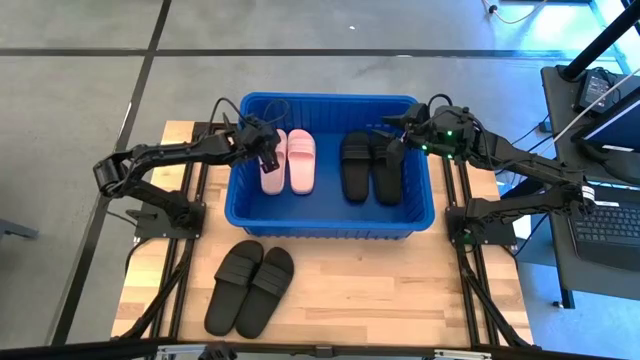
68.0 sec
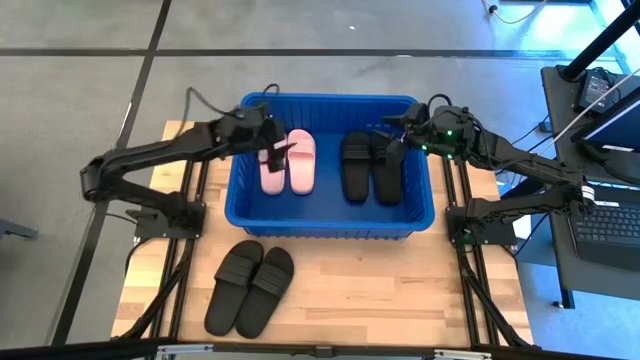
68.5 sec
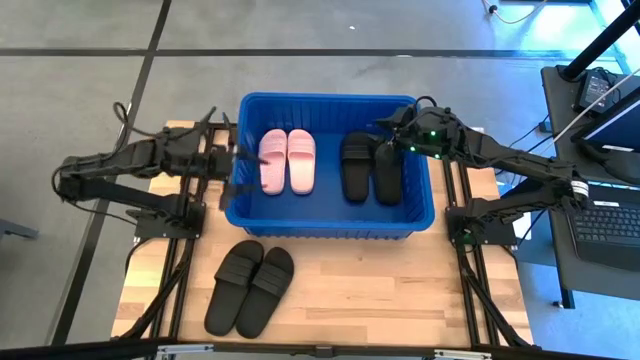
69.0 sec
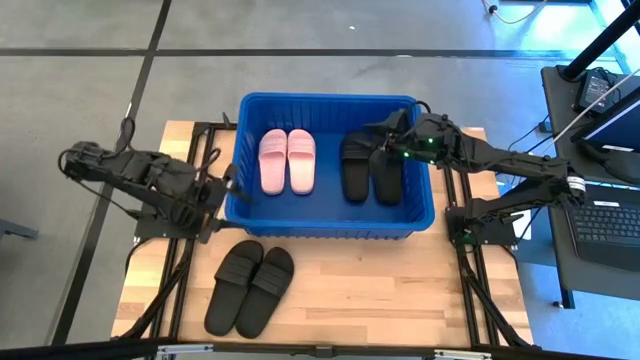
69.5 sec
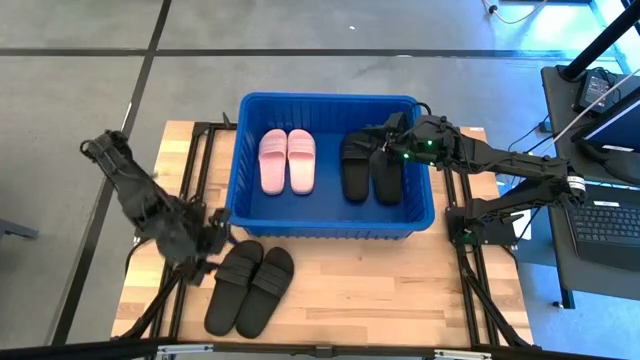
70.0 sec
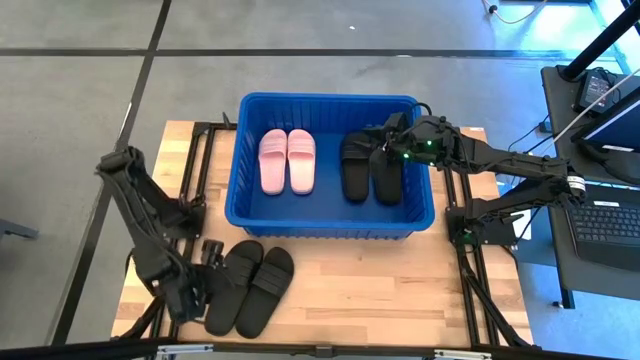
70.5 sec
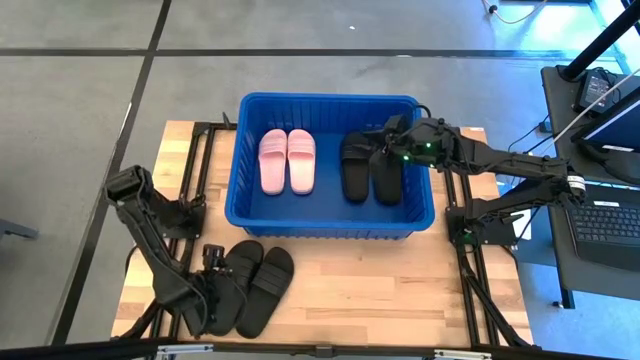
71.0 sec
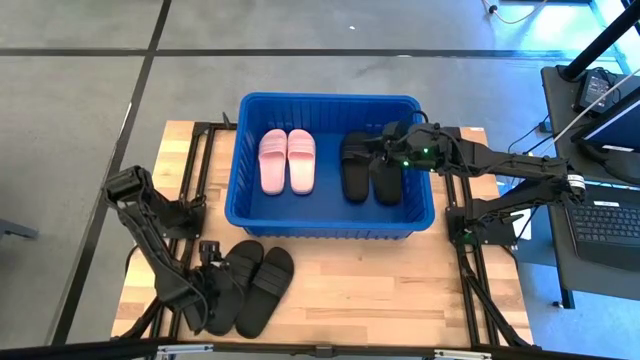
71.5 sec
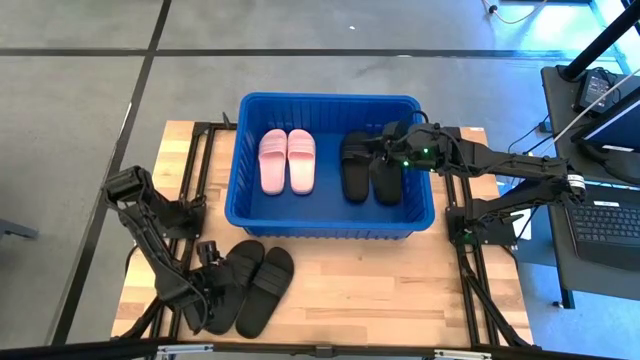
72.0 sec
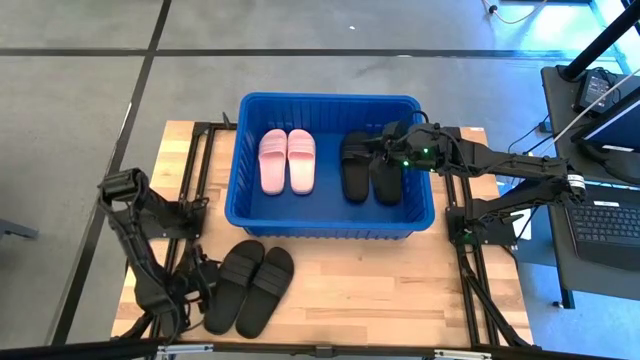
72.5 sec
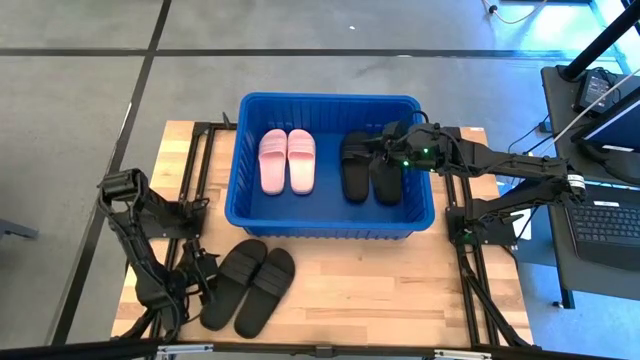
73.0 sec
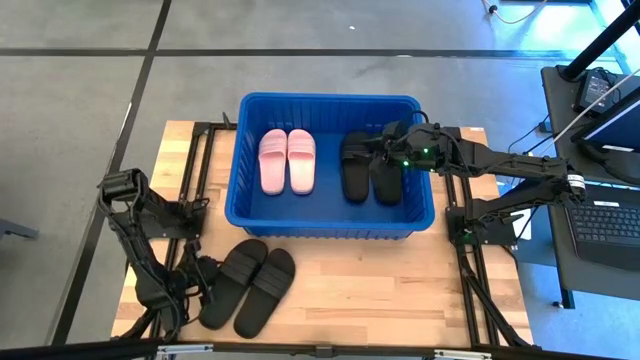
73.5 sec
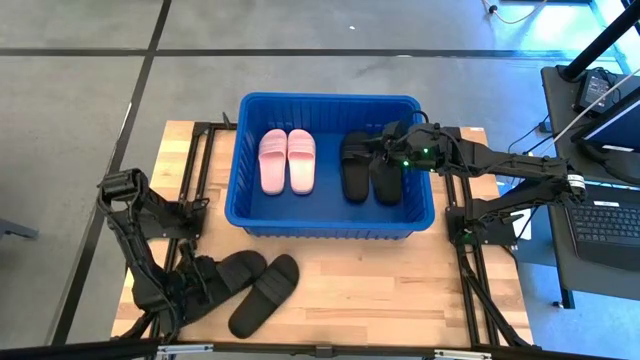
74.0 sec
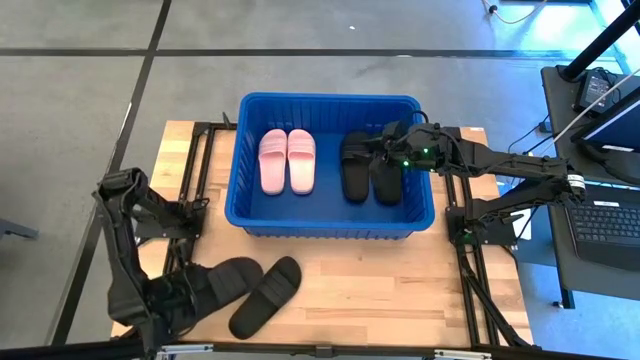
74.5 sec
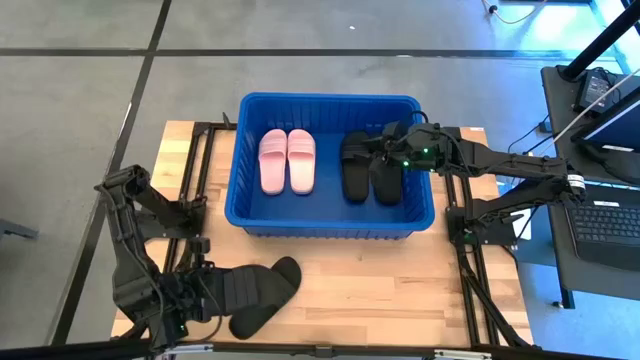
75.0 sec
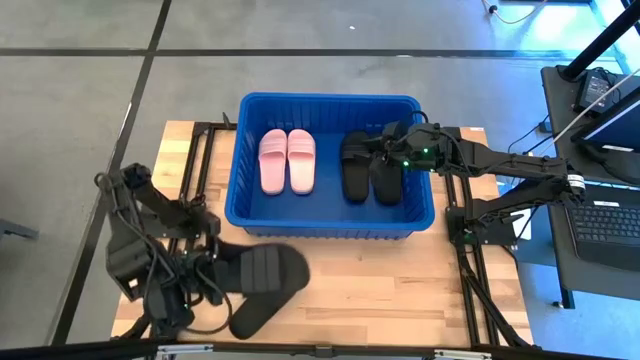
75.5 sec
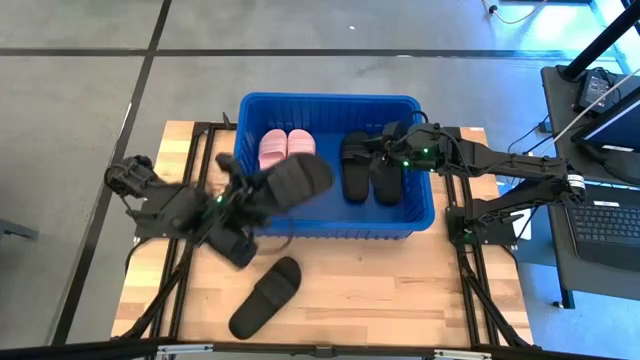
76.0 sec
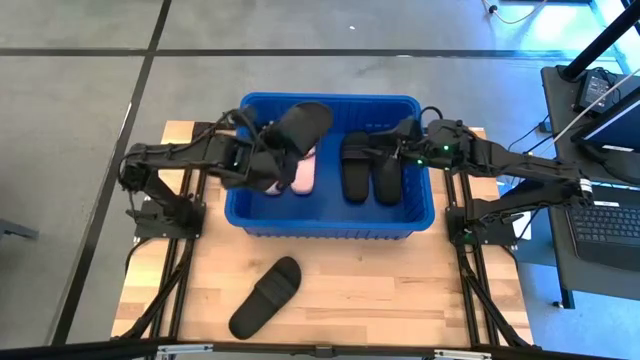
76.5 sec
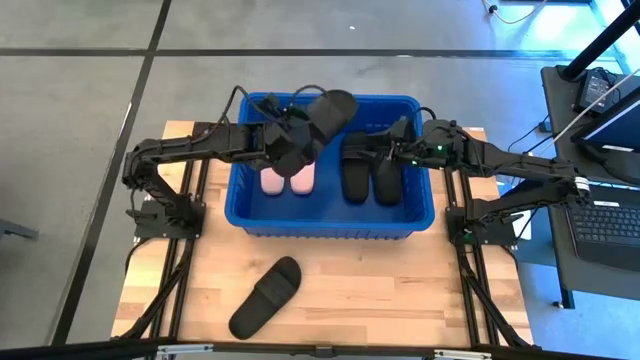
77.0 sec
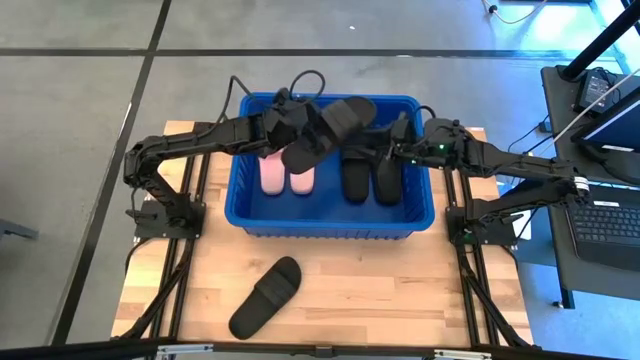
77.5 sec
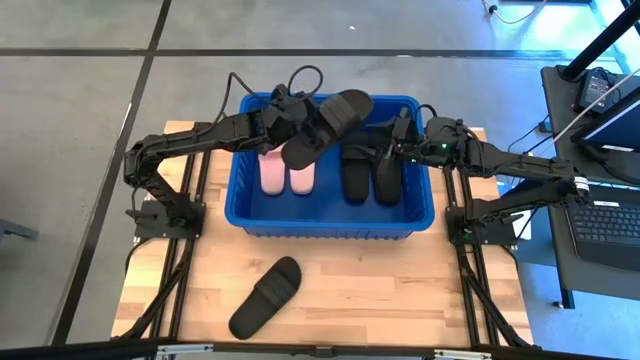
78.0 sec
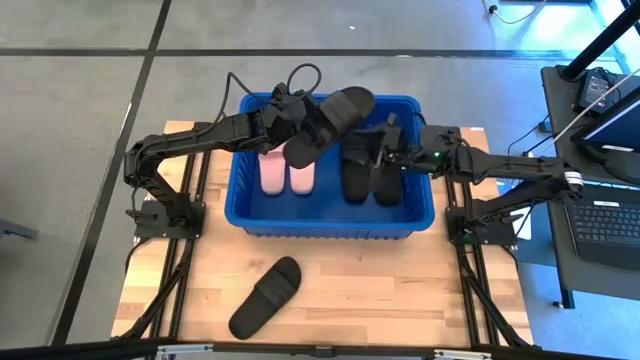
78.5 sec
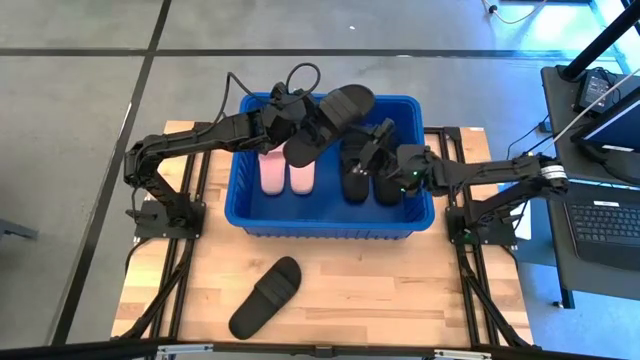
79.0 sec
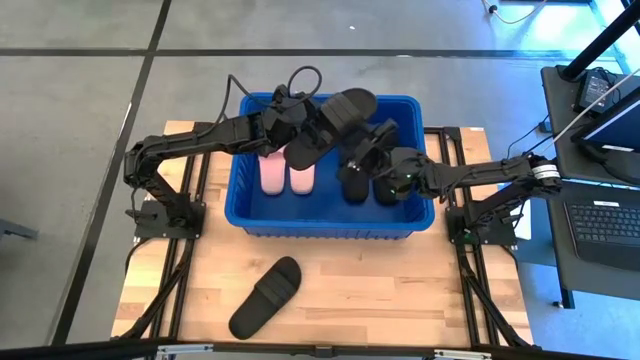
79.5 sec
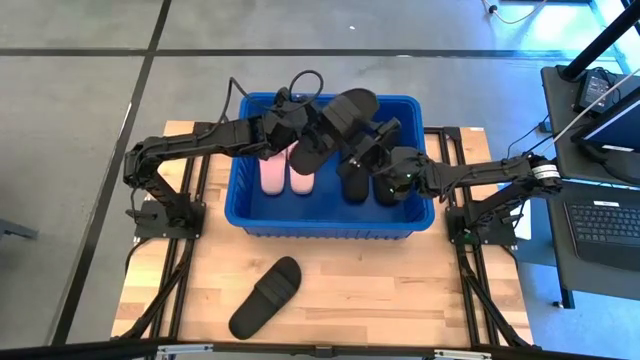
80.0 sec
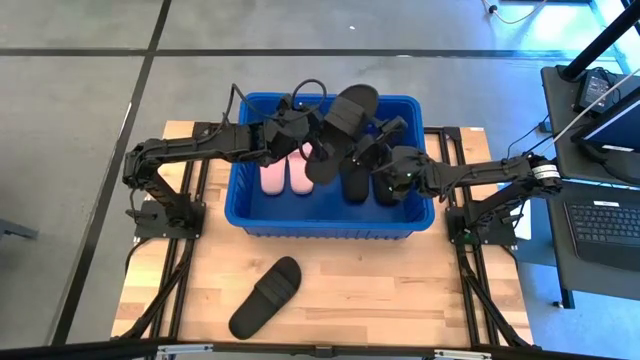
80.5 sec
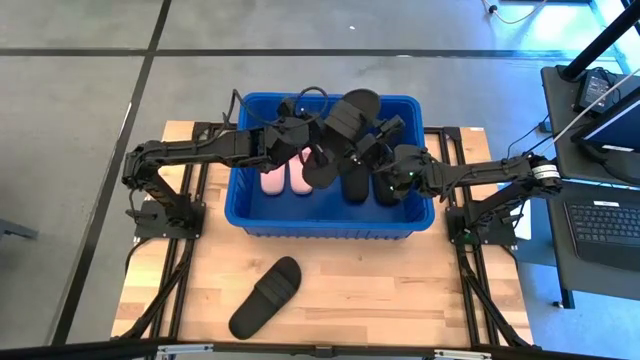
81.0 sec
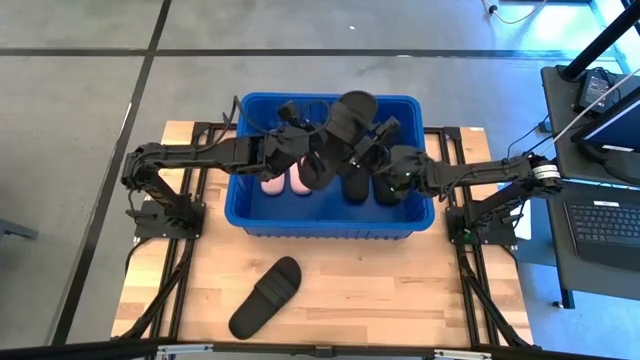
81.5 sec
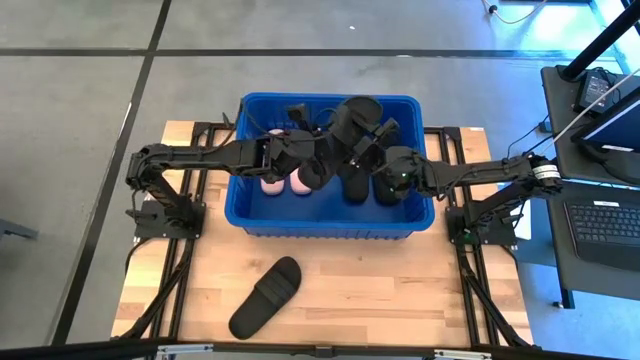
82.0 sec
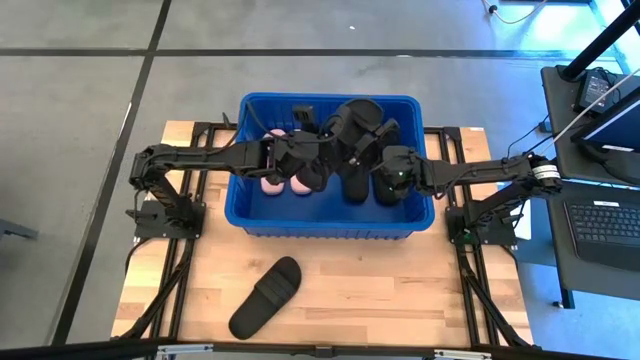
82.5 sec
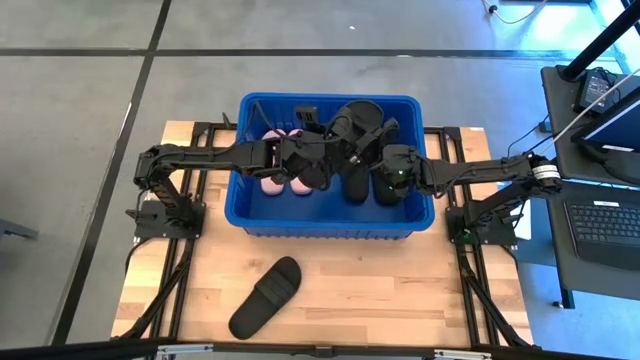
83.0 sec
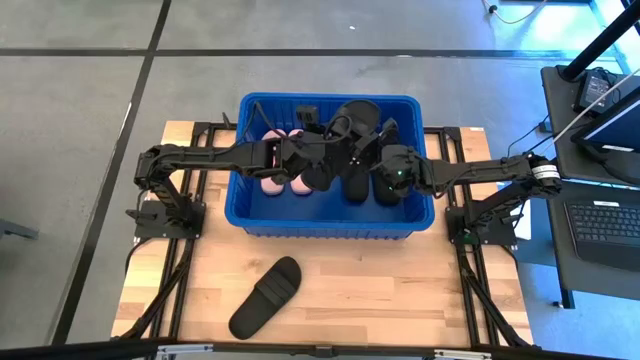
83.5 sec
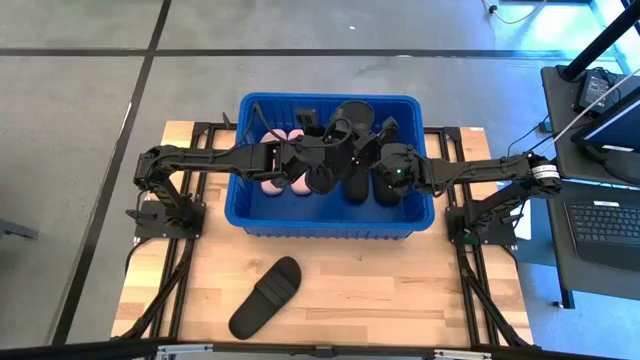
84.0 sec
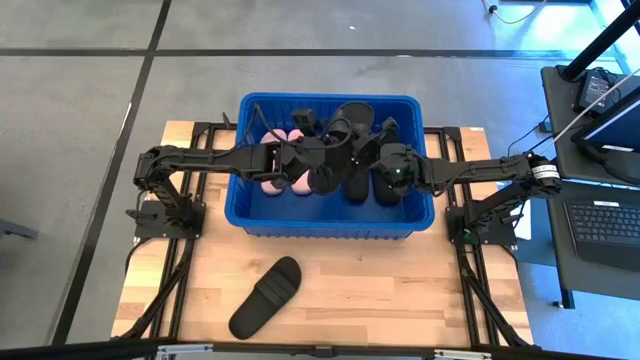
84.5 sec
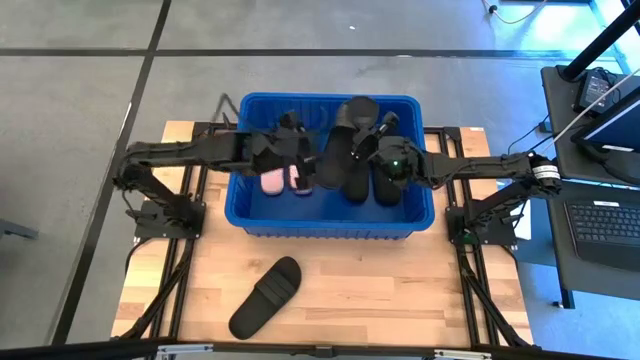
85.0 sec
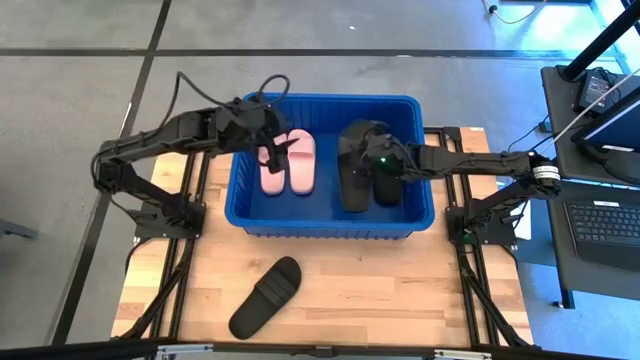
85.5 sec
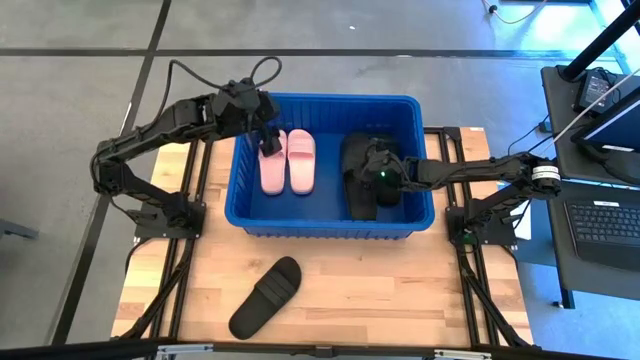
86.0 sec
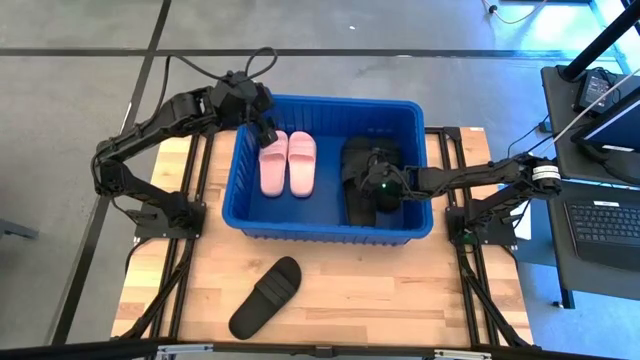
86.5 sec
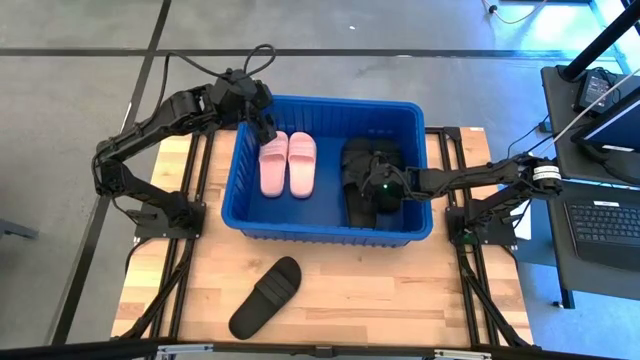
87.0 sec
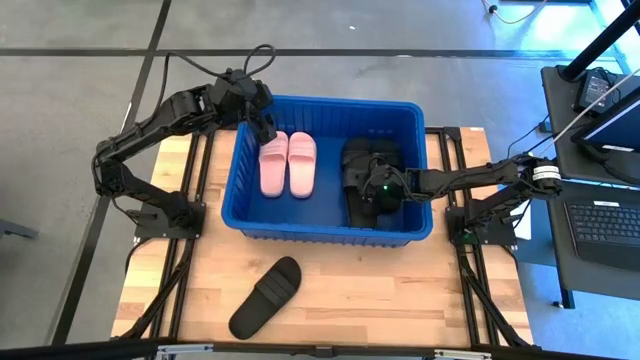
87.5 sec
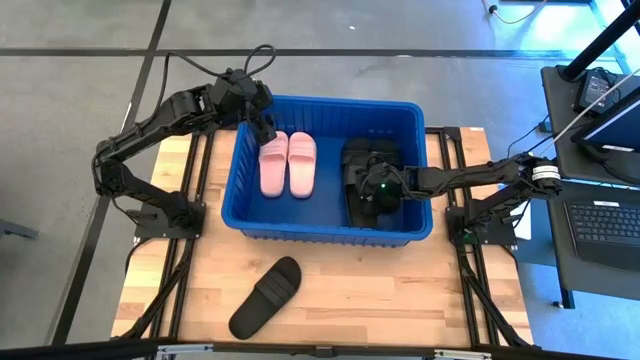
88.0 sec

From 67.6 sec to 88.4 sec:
Task: Pick and place slides into bin
Put the black slipper into the blue bin
